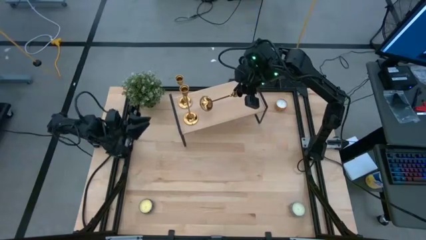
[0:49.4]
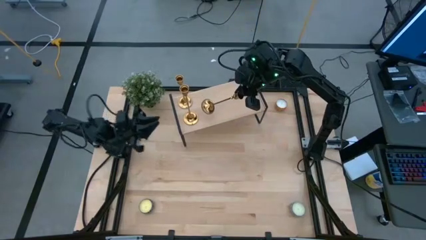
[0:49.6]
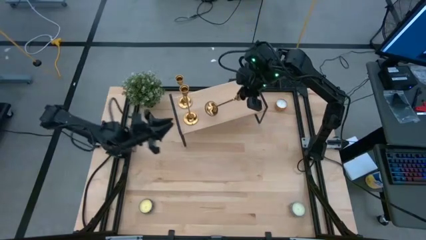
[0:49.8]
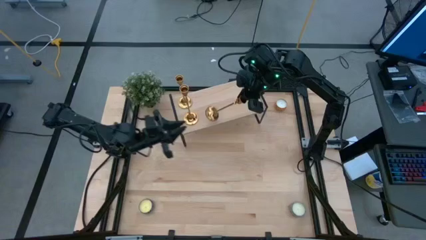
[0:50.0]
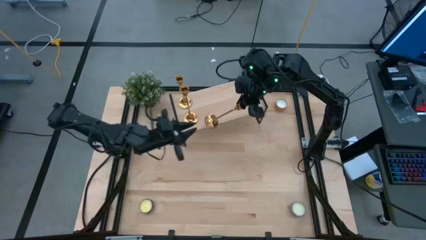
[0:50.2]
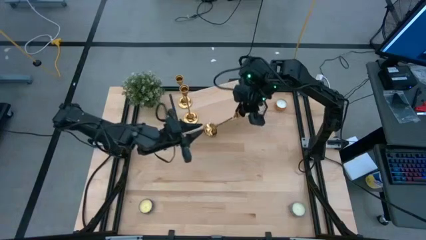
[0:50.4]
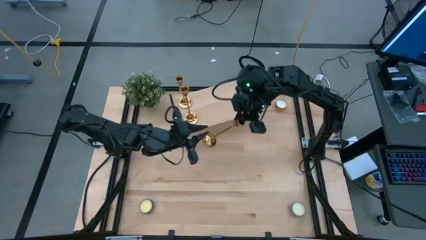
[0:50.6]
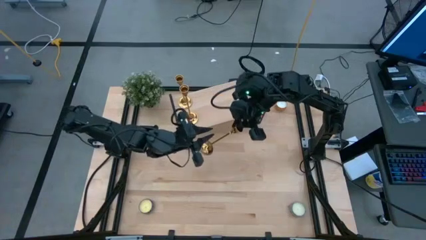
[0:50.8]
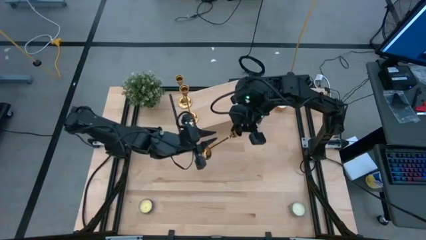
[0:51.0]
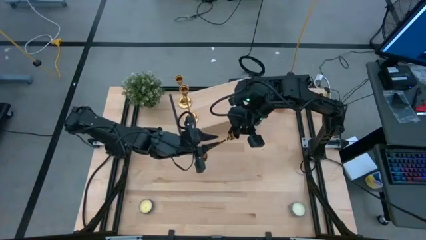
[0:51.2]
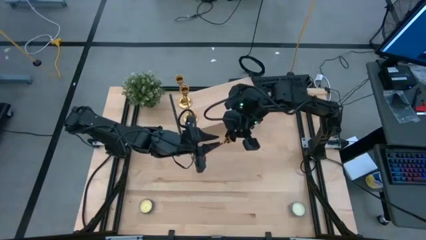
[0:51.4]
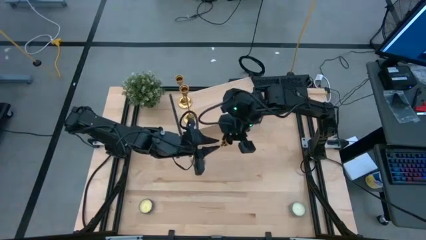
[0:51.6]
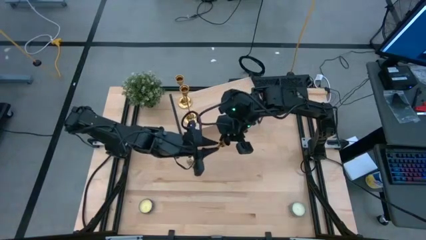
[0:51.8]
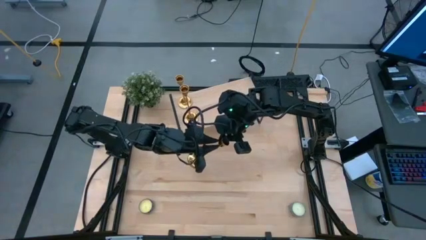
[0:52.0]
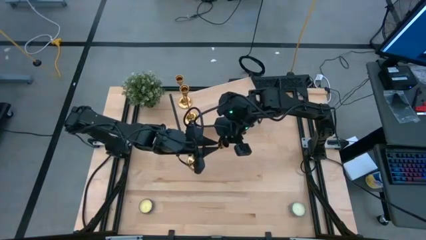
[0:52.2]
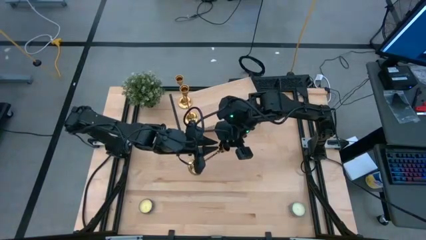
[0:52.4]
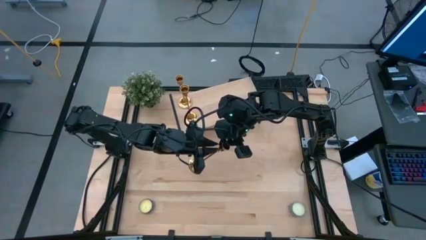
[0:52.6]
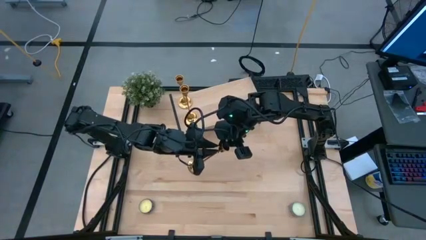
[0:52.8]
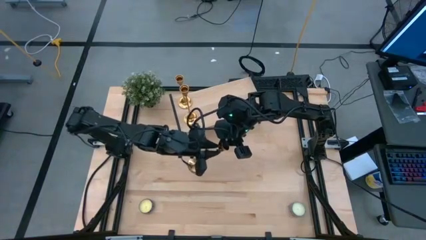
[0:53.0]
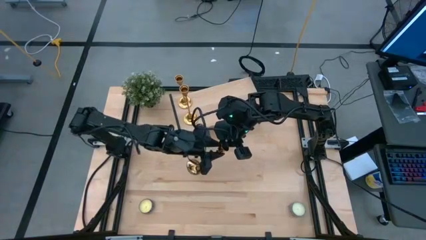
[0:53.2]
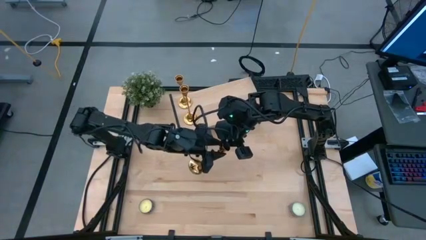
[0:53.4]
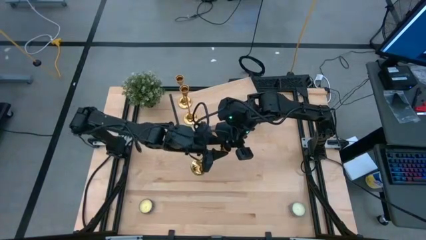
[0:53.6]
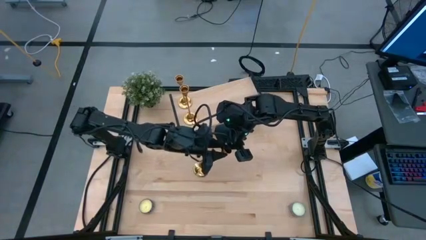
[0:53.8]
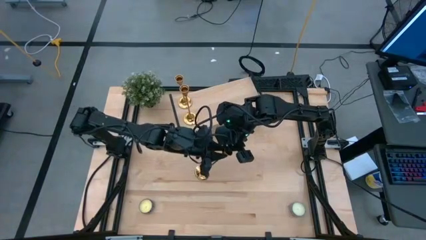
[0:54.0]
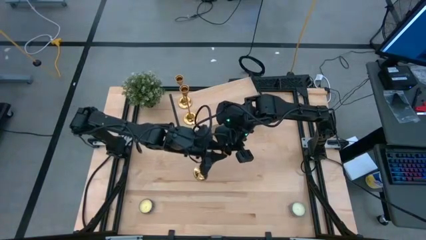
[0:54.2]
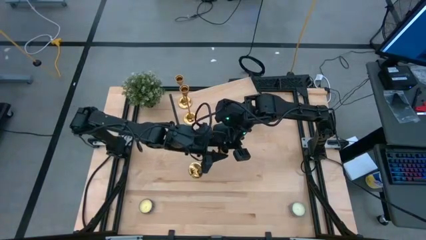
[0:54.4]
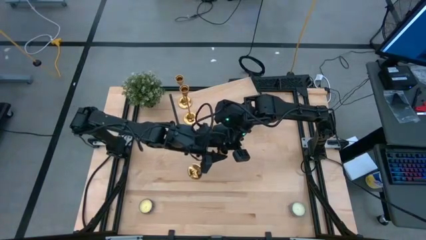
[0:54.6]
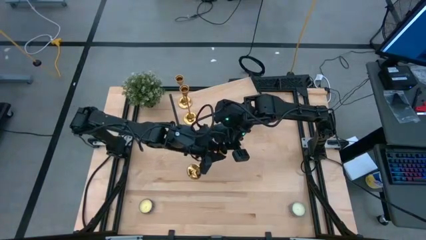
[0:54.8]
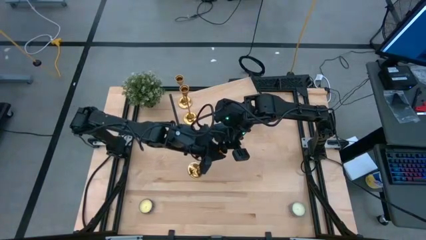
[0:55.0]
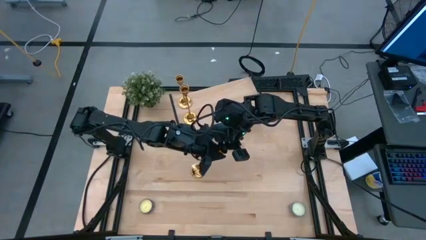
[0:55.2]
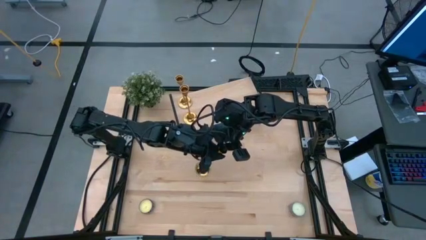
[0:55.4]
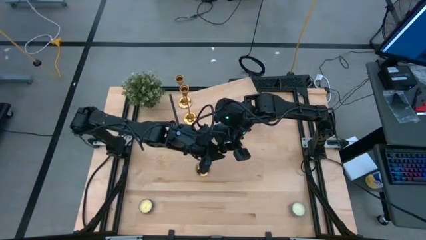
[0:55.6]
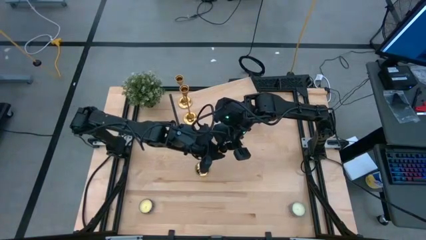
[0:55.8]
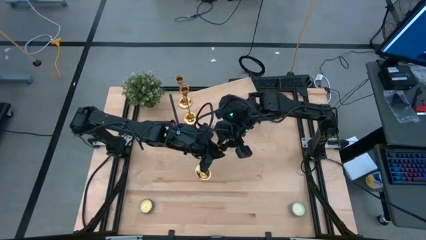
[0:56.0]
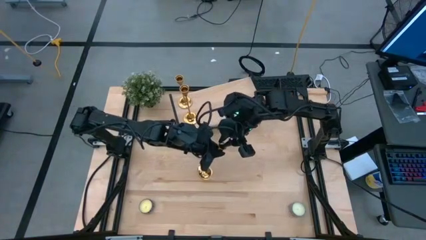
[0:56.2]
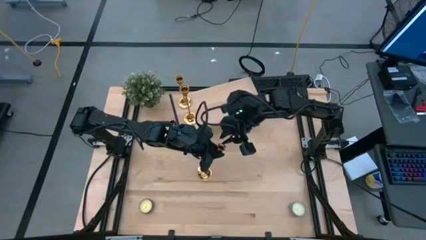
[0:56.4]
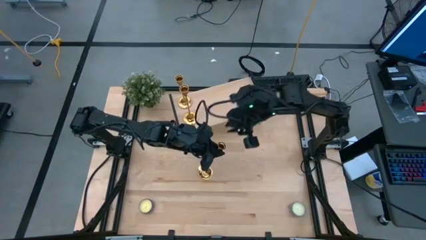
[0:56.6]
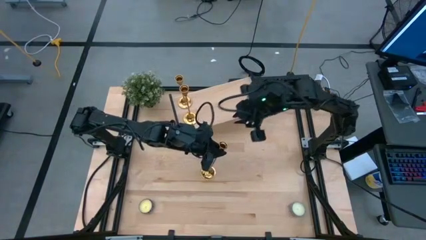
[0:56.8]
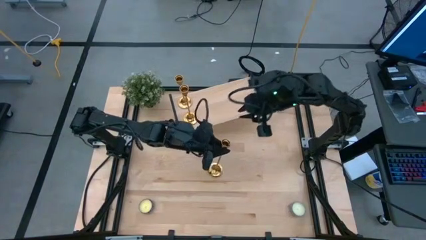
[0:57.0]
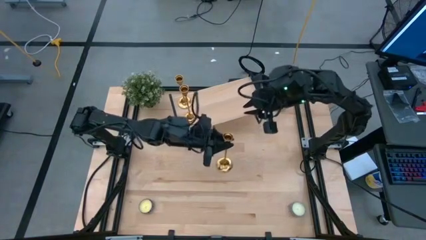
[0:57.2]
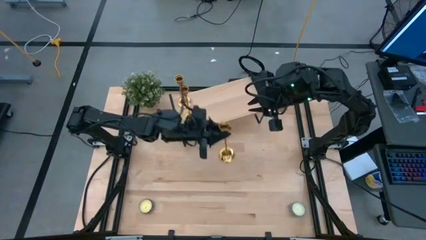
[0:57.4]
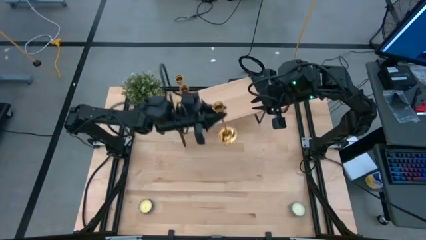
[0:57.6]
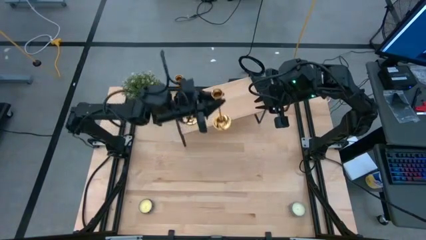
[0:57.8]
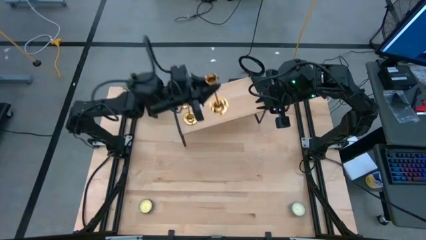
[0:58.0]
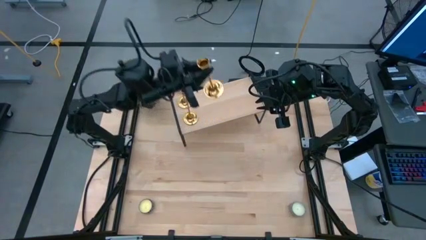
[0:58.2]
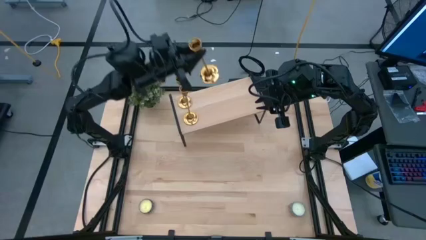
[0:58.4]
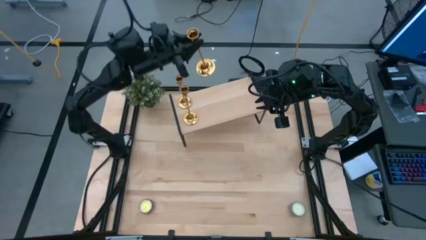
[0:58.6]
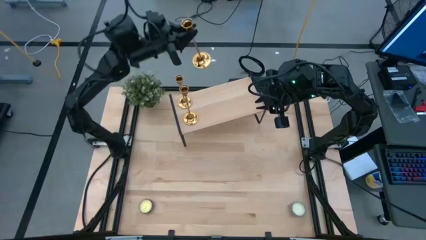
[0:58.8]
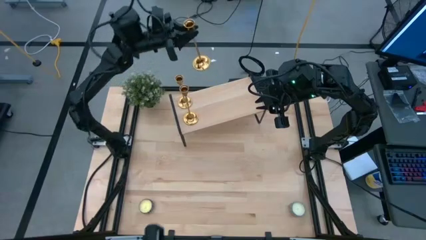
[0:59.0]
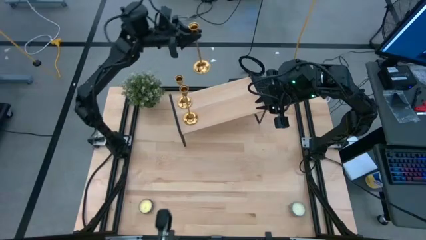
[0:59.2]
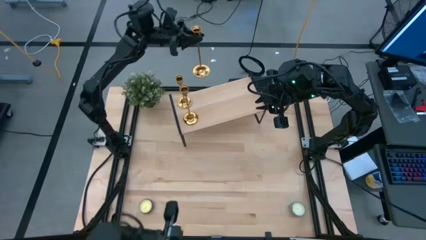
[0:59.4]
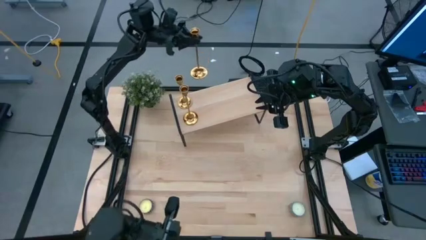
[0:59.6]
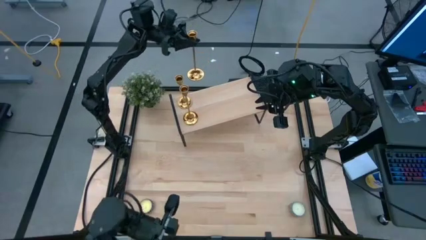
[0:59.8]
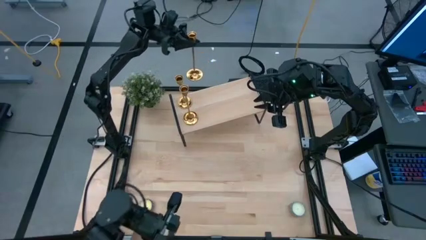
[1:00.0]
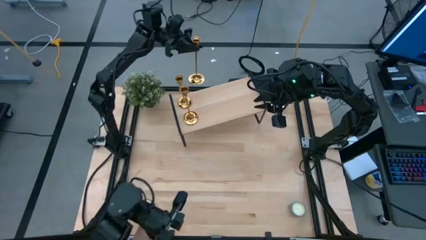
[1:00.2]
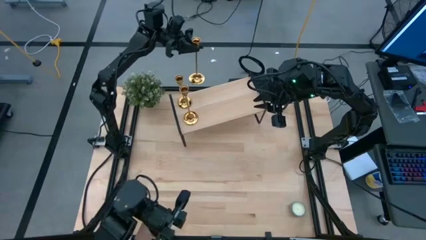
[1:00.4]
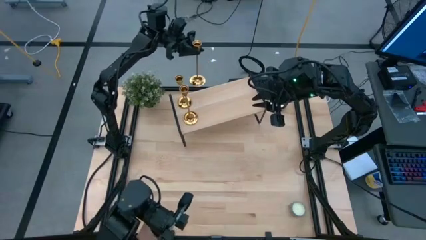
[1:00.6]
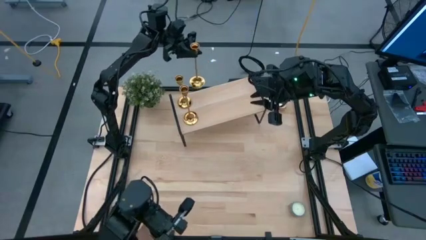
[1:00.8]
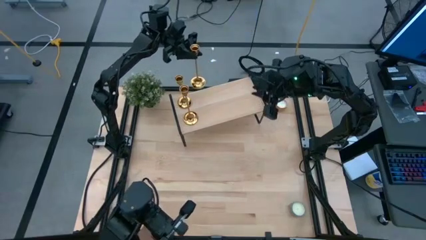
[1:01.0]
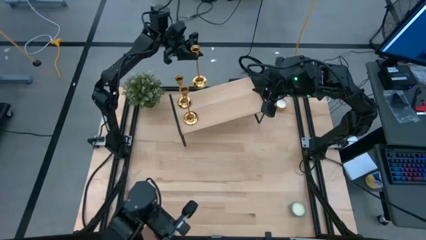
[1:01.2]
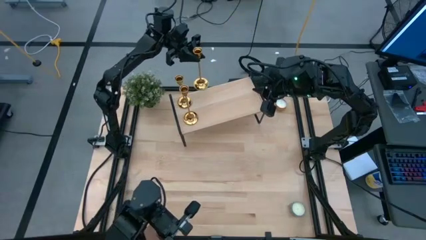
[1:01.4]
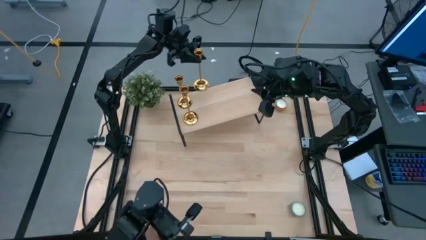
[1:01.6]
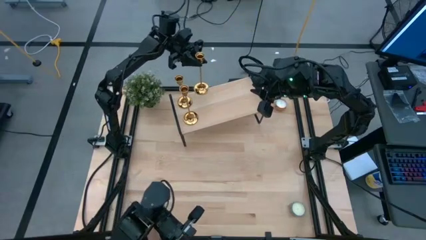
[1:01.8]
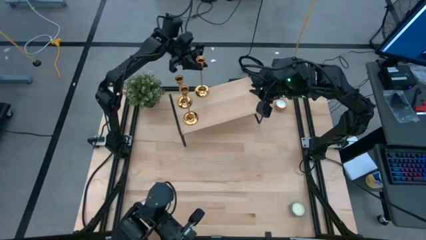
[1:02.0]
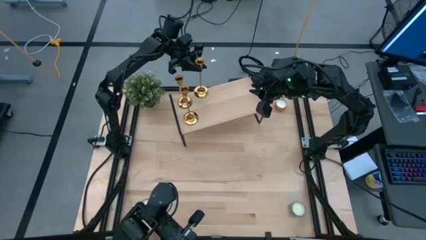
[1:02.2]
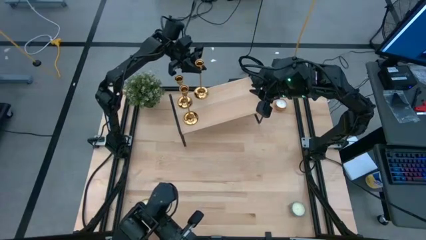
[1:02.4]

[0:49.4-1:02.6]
Task: Pick & Place candle stick holders
Put the gold candle holder on the shelf
